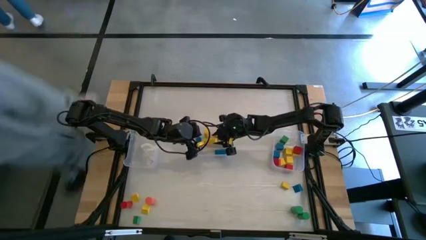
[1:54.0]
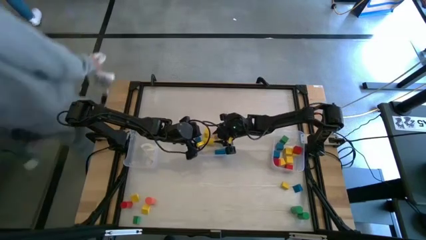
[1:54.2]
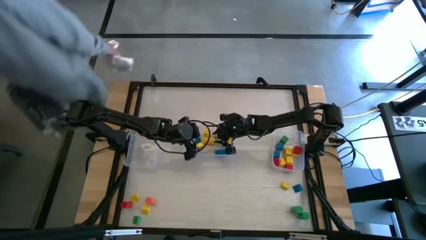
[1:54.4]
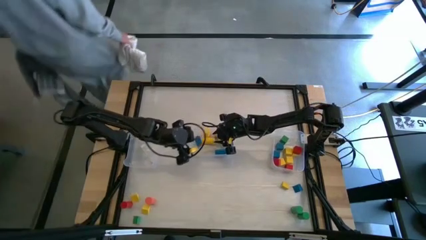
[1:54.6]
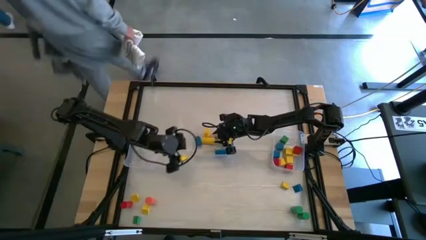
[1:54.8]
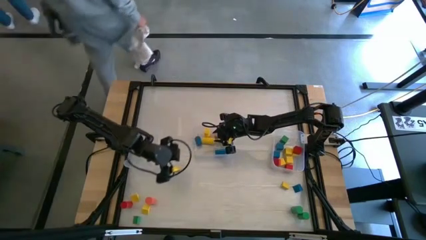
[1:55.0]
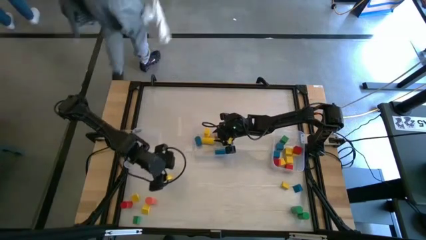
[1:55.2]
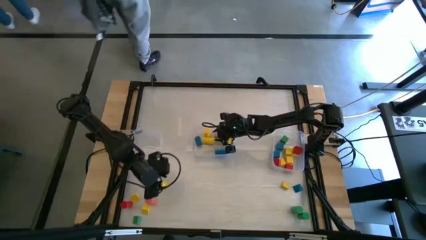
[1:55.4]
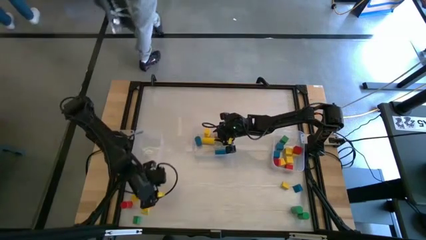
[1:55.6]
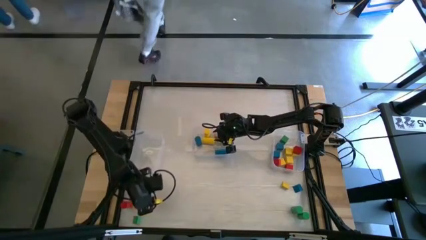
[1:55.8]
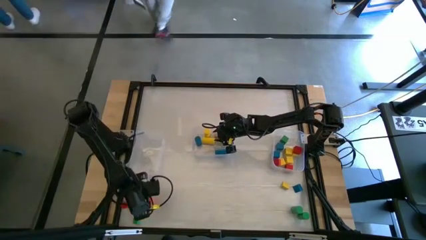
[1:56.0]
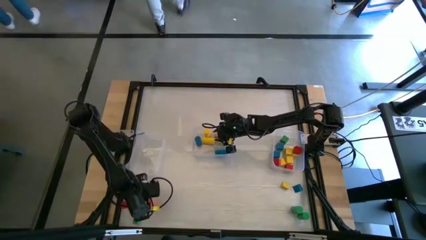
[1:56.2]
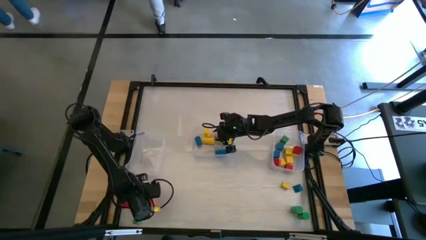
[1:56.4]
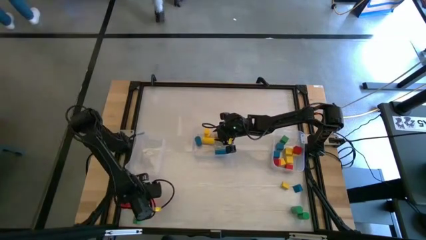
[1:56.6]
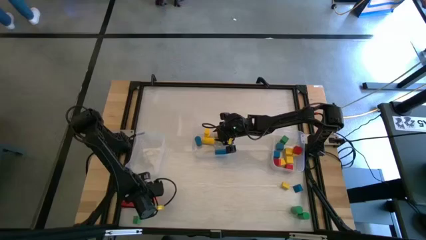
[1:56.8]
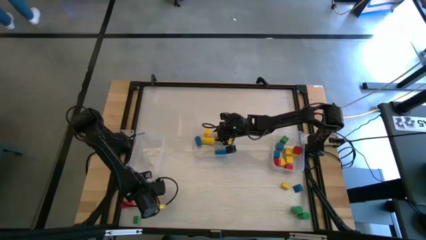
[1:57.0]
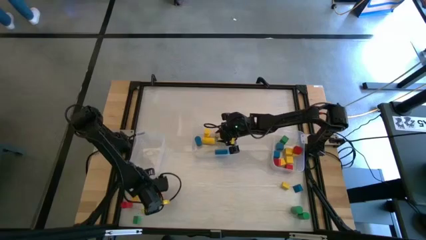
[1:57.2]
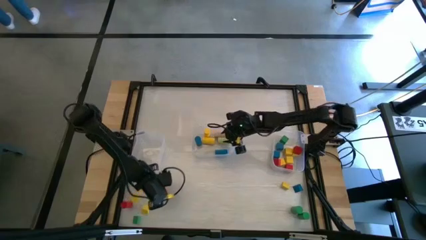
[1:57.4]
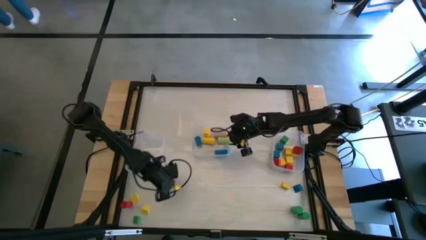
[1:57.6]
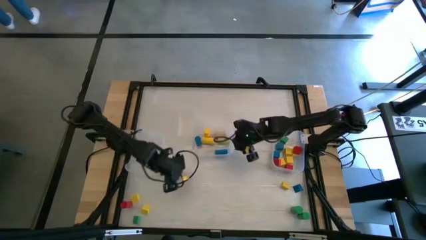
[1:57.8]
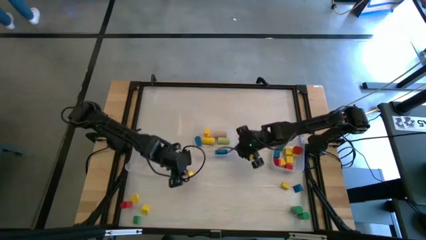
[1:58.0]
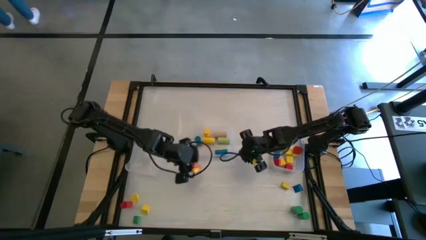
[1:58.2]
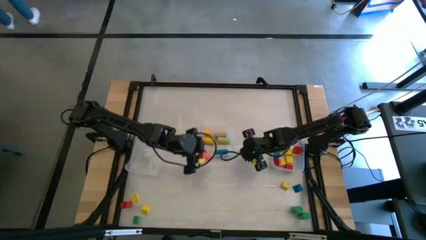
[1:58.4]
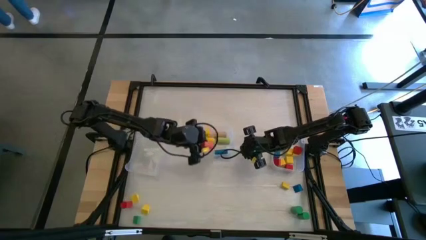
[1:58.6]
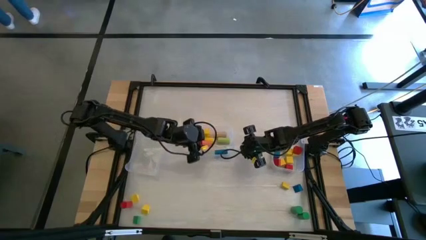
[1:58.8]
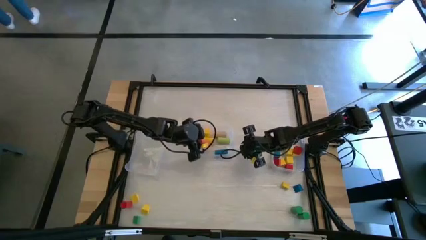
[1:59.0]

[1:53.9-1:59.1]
Task: Sort blocks by size
Put the pink cylinder block into the center transparent bin

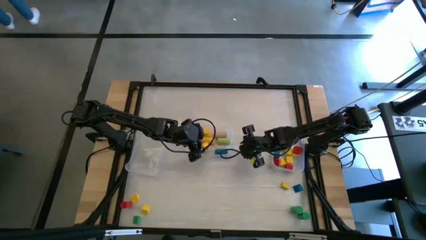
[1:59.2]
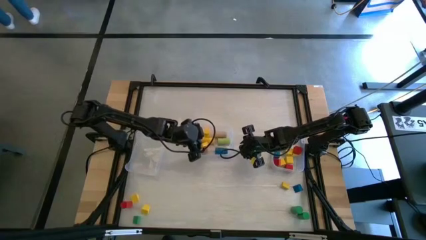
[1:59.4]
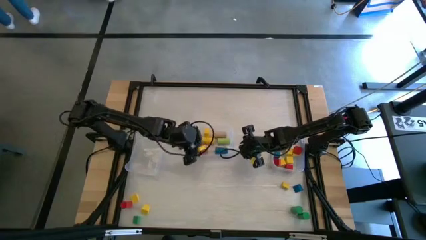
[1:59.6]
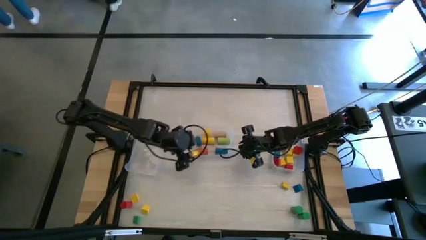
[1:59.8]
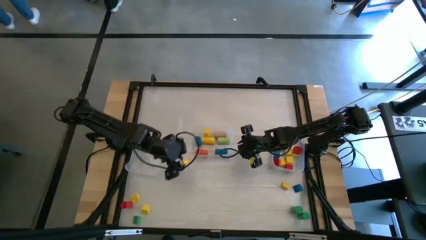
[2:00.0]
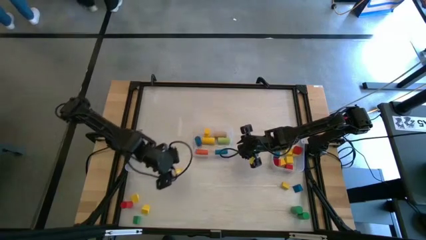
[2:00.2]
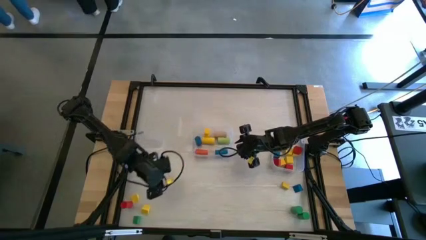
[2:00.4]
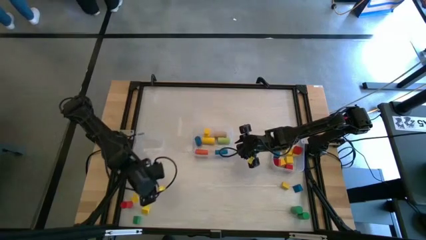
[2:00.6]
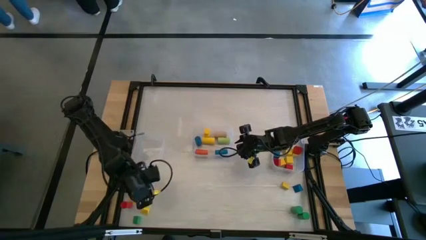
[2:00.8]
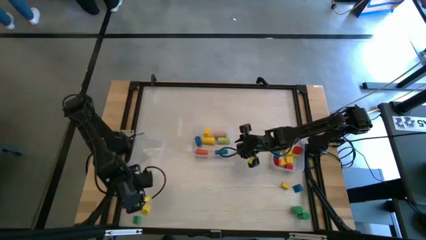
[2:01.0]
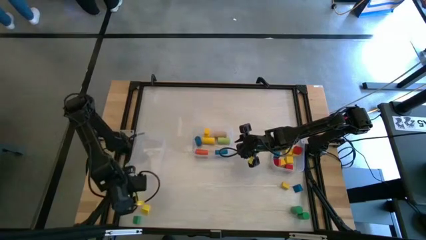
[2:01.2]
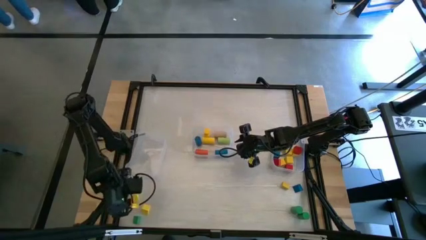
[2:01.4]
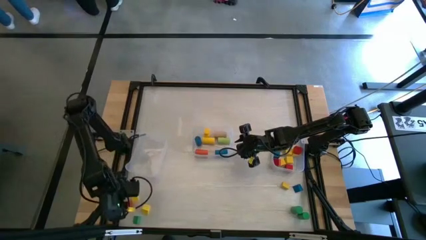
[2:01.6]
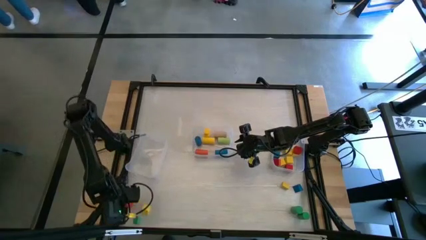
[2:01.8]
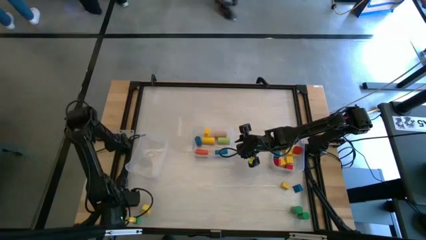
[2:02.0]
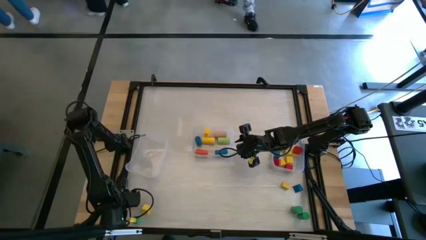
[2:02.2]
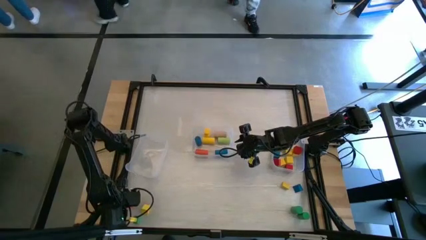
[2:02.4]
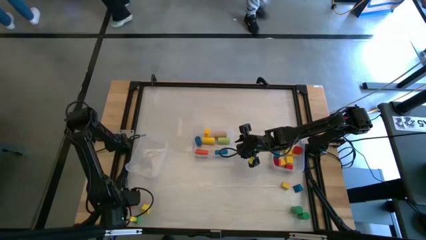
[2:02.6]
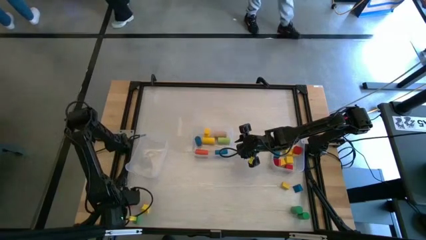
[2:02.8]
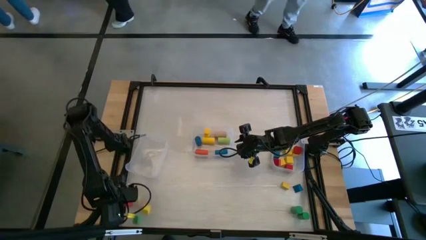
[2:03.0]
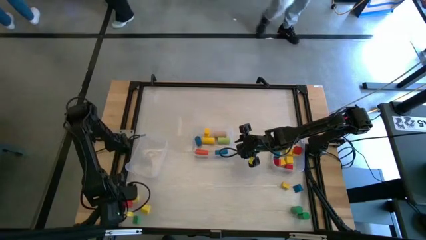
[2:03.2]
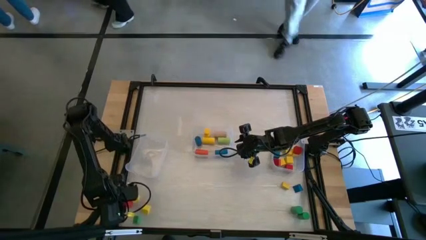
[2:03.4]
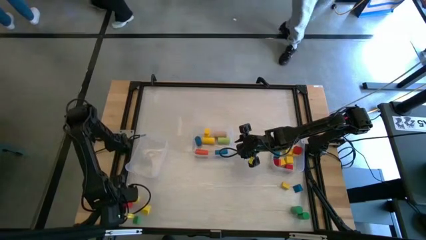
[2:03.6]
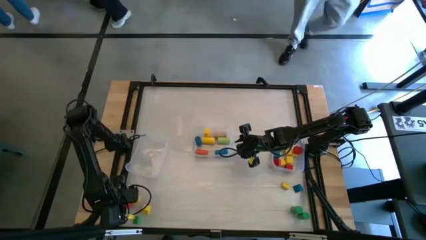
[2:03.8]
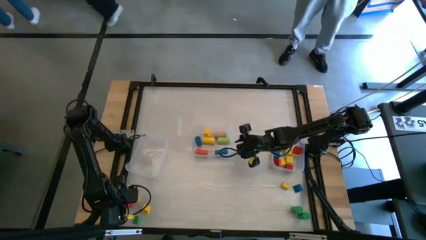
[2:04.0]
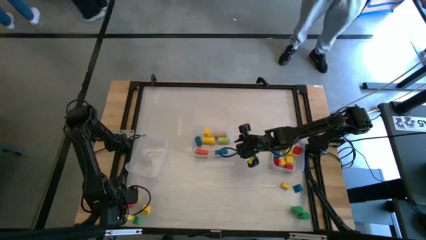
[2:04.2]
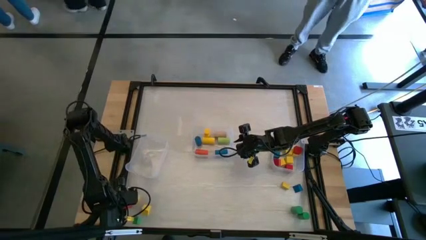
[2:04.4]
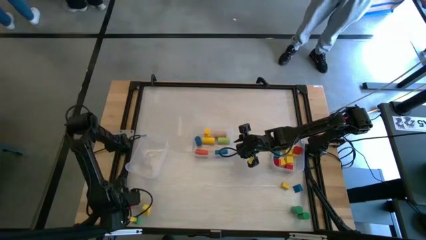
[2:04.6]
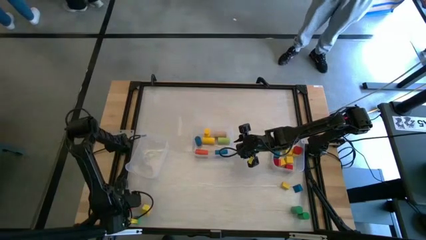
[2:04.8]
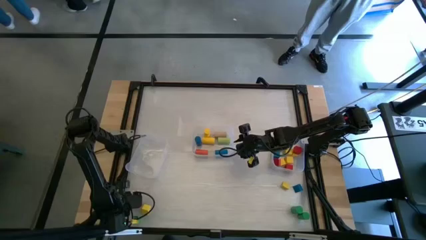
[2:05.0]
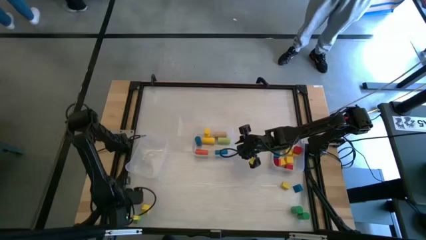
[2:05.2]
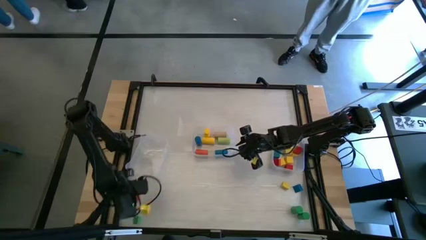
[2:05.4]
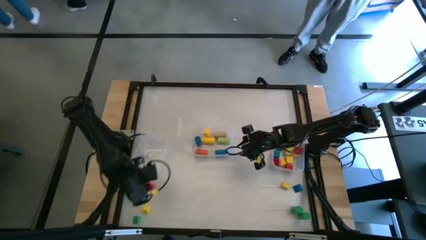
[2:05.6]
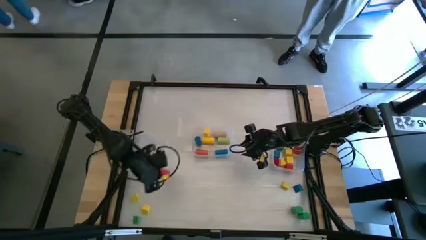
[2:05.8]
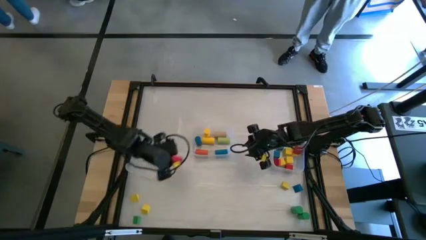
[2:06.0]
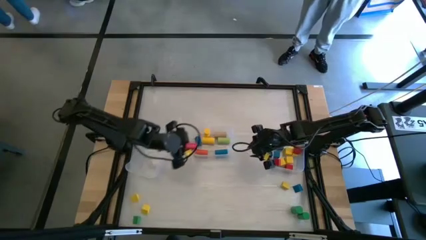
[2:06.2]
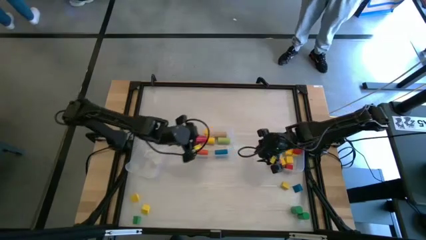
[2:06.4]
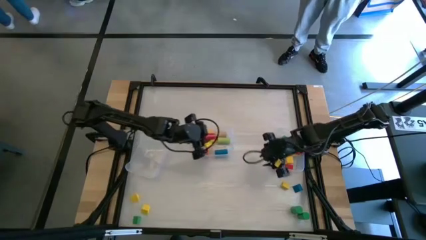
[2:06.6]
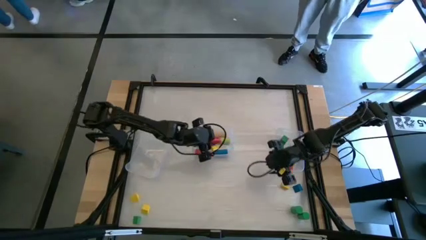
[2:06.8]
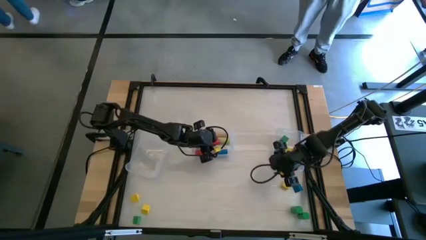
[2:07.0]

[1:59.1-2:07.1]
Put the red cylinder block into the center transparent bin

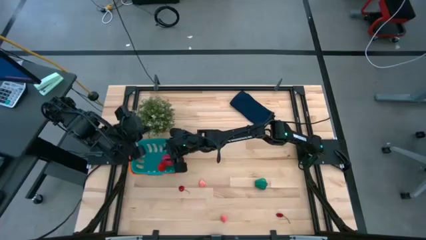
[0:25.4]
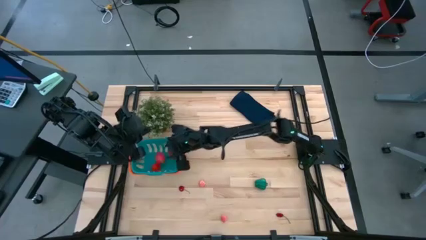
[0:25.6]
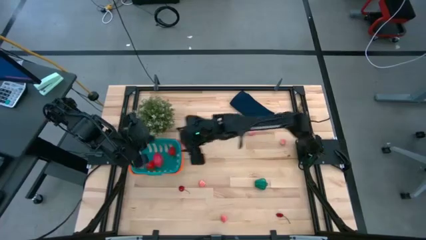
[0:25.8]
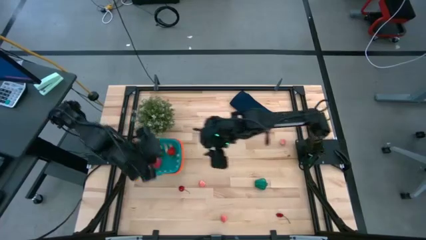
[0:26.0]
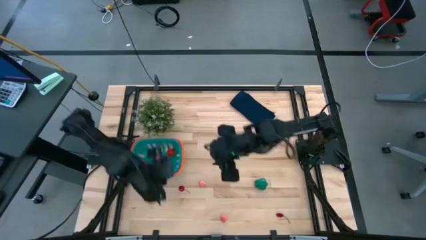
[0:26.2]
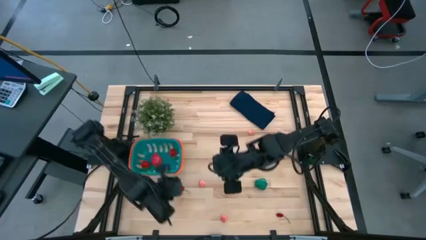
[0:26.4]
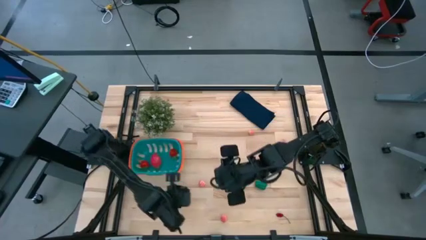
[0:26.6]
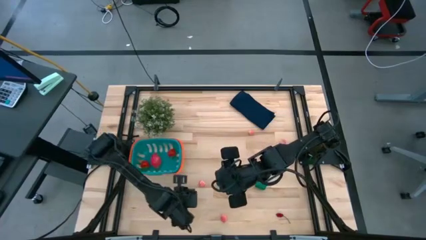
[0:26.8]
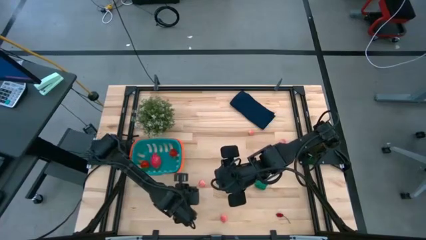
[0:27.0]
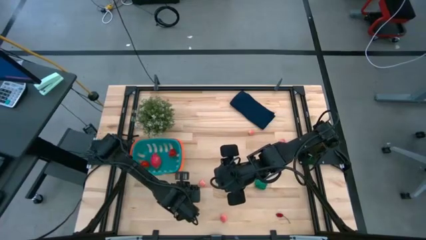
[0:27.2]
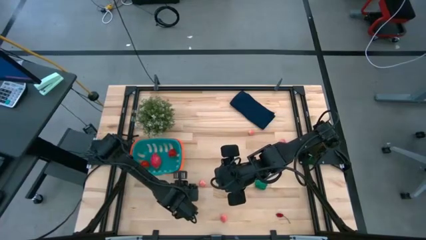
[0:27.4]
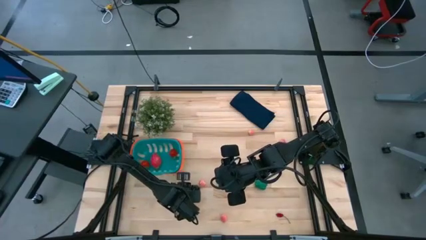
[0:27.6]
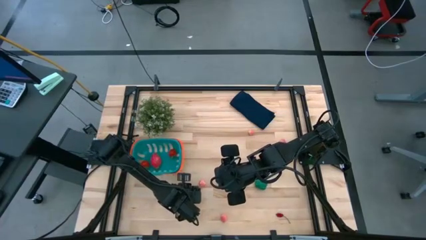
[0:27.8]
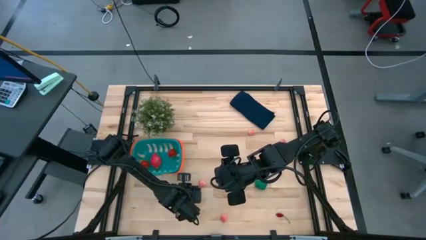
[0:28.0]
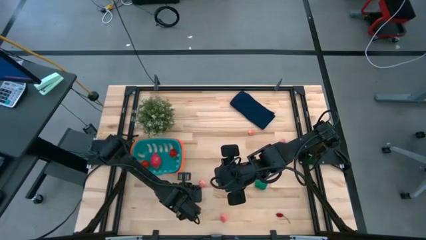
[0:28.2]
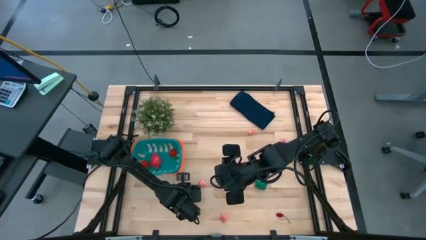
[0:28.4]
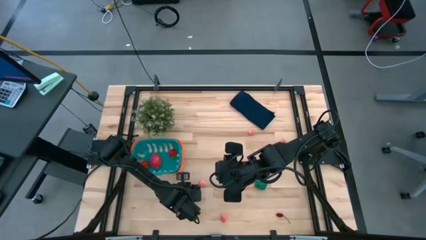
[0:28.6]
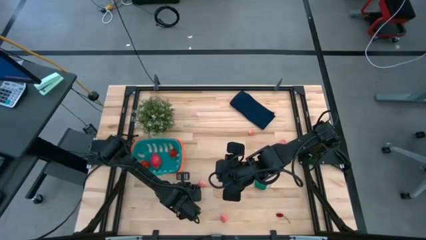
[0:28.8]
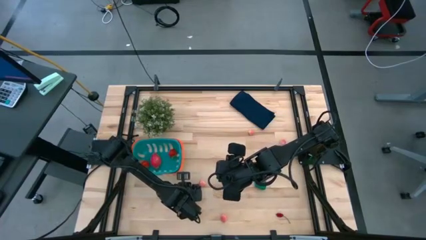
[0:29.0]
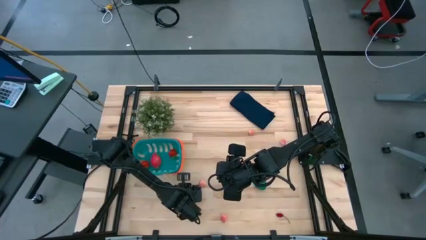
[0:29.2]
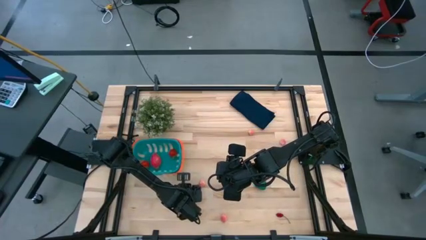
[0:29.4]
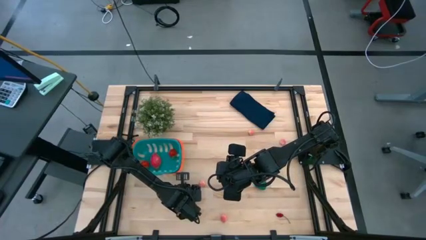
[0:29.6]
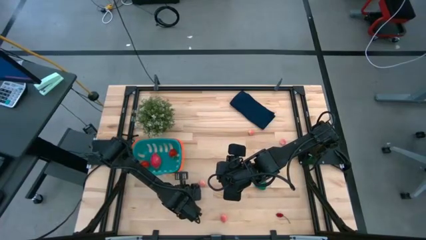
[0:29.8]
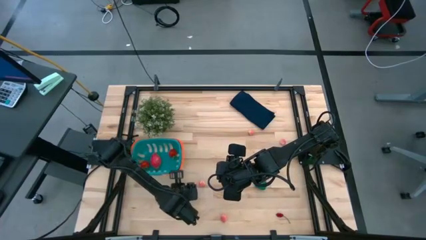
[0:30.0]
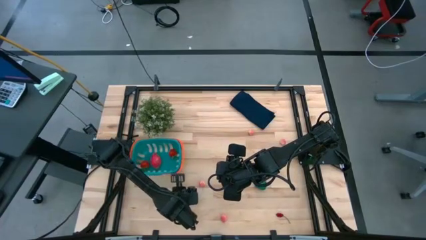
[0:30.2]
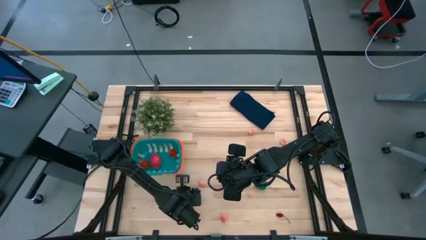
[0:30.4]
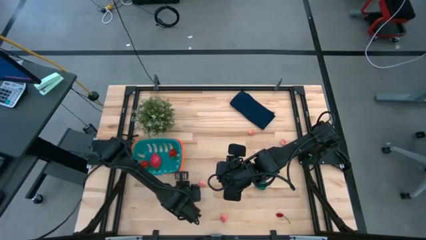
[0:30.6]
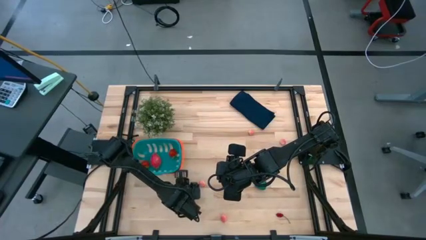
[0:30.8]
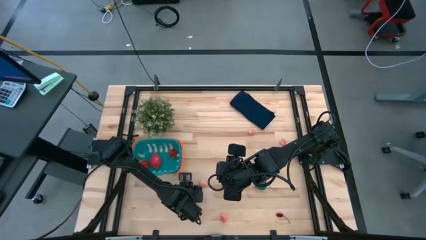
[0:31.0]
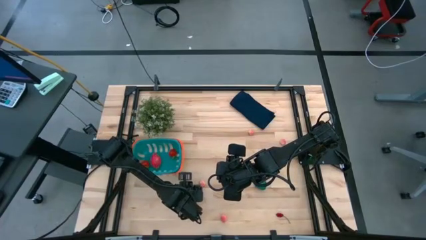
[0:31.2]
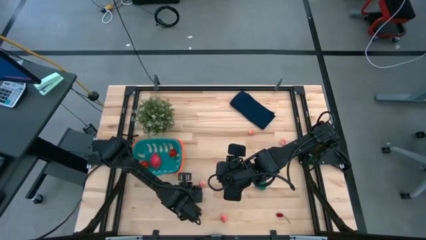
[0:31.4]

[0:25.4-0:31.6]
Task: Pick and placing Produce into tupperware
Put the red cherry into the green basket
